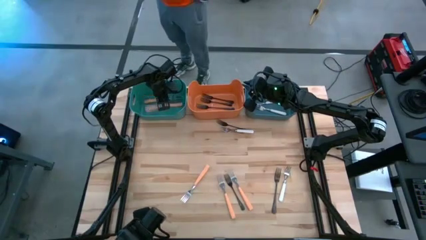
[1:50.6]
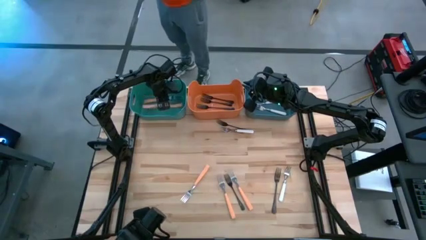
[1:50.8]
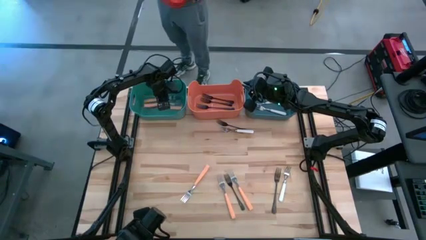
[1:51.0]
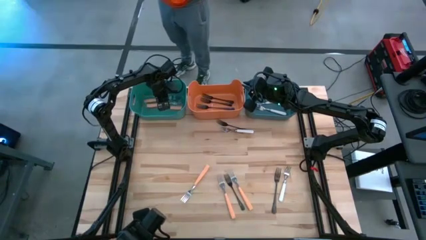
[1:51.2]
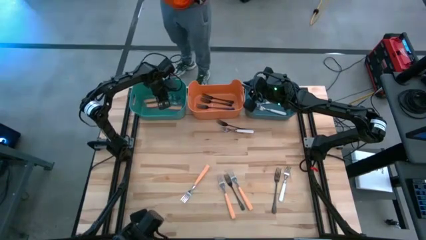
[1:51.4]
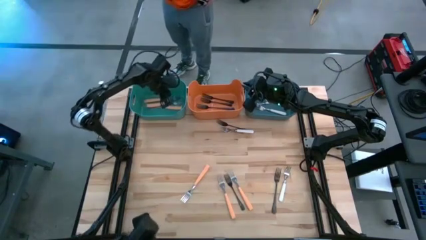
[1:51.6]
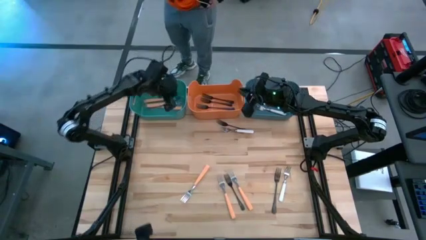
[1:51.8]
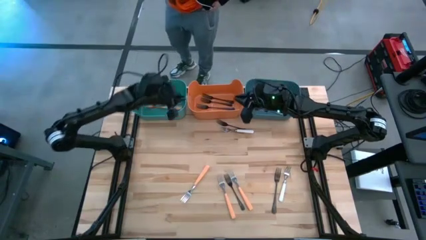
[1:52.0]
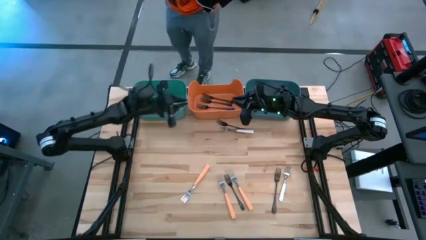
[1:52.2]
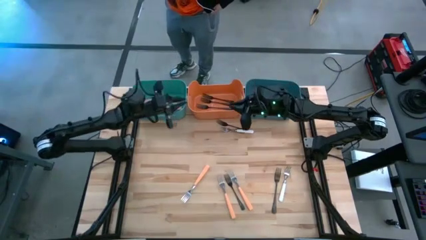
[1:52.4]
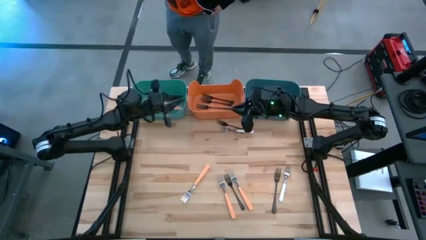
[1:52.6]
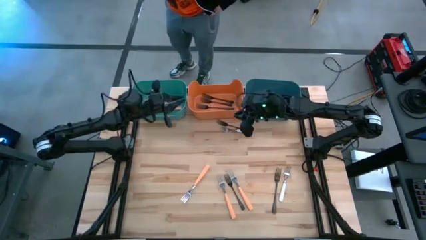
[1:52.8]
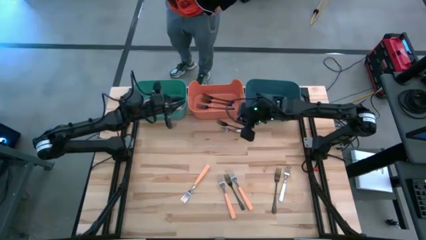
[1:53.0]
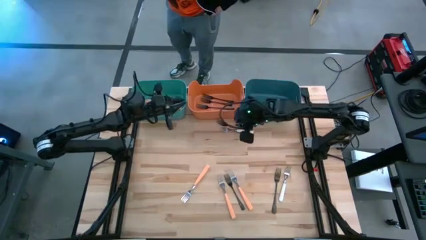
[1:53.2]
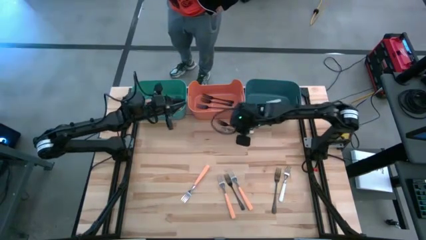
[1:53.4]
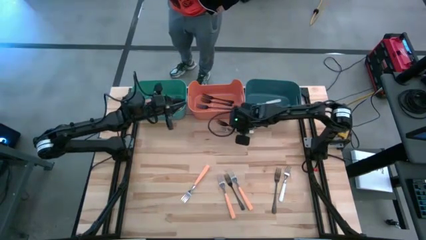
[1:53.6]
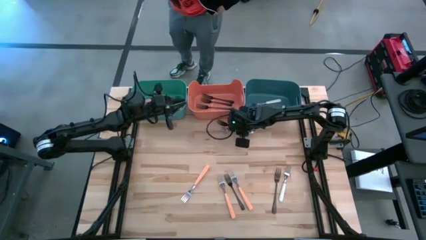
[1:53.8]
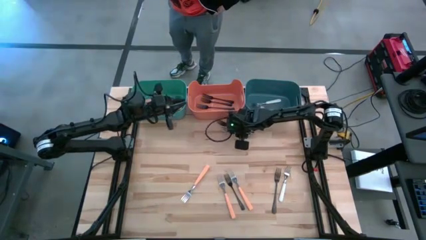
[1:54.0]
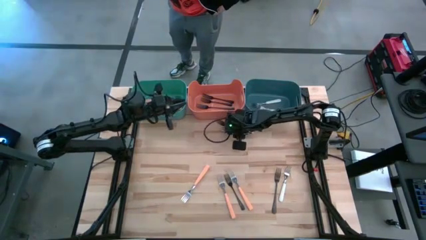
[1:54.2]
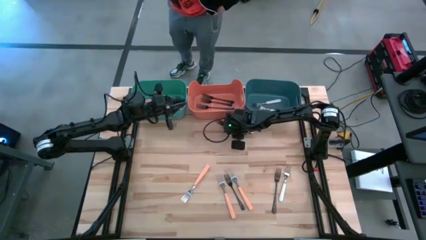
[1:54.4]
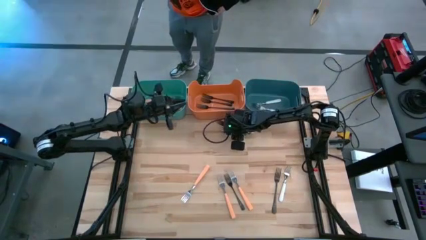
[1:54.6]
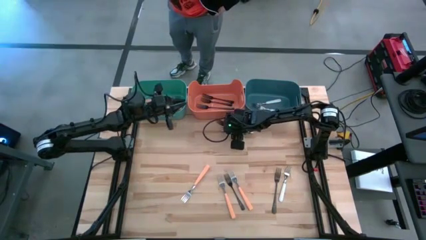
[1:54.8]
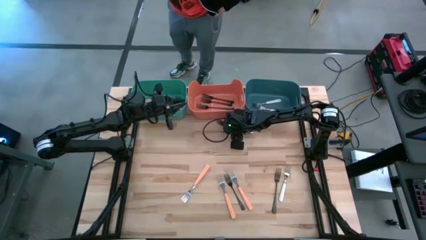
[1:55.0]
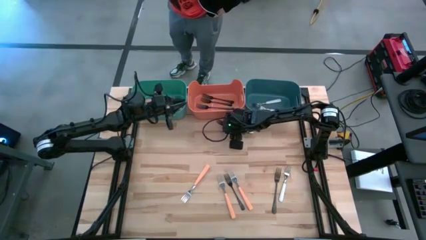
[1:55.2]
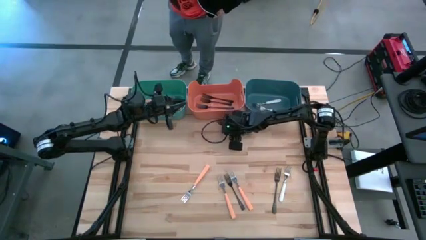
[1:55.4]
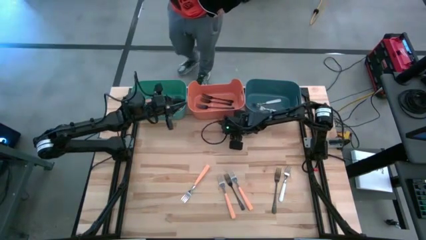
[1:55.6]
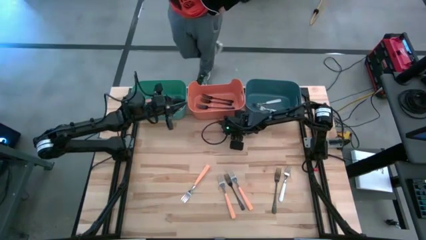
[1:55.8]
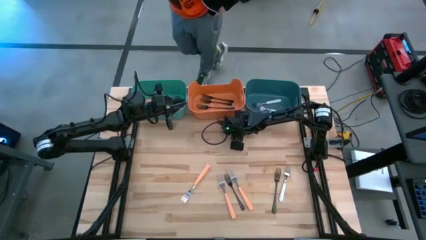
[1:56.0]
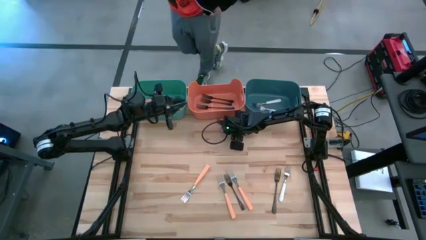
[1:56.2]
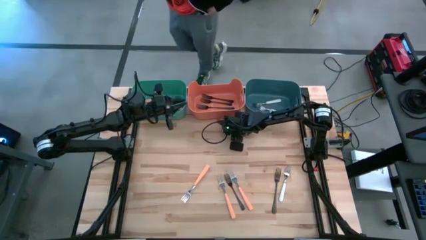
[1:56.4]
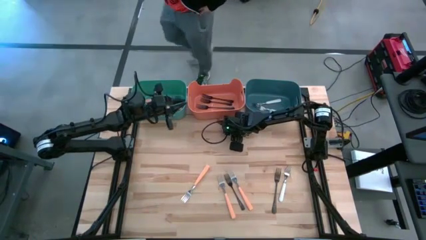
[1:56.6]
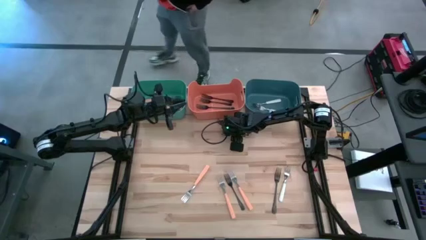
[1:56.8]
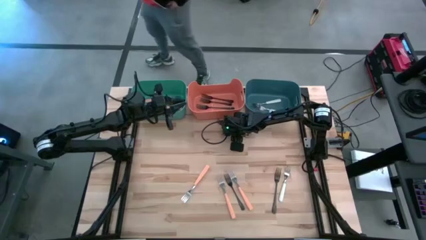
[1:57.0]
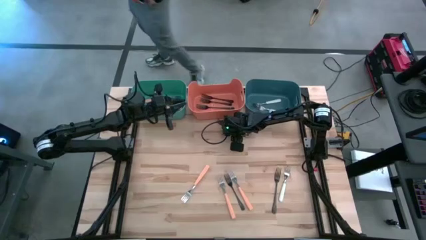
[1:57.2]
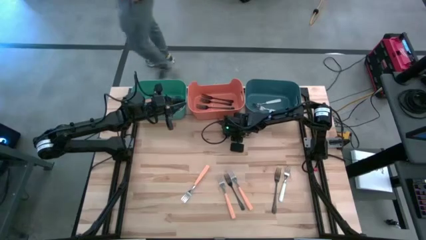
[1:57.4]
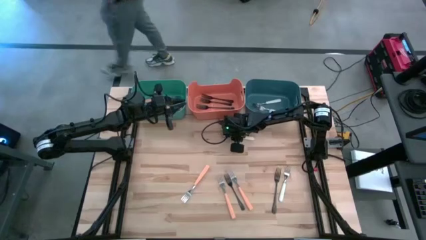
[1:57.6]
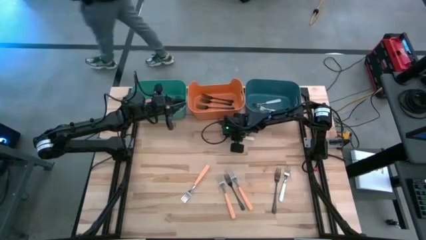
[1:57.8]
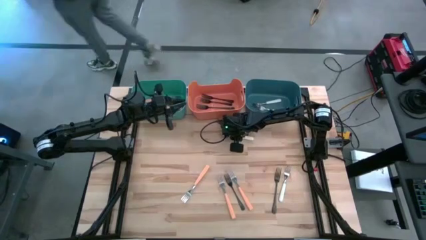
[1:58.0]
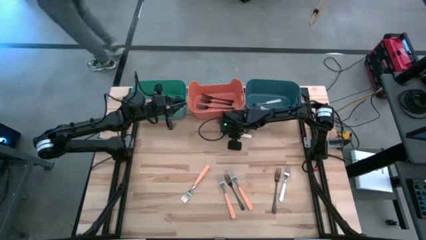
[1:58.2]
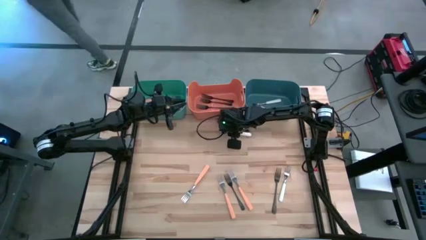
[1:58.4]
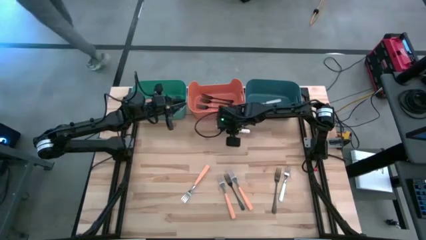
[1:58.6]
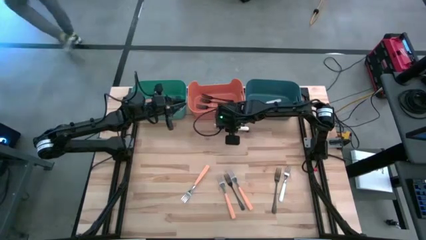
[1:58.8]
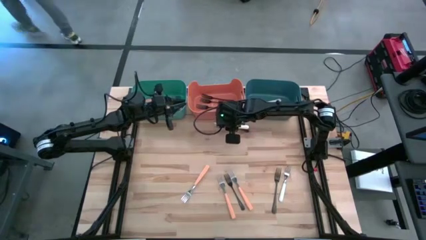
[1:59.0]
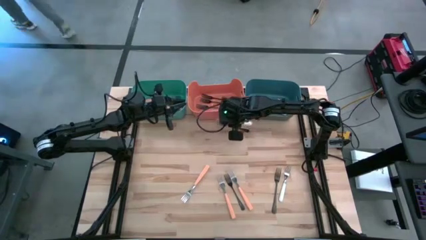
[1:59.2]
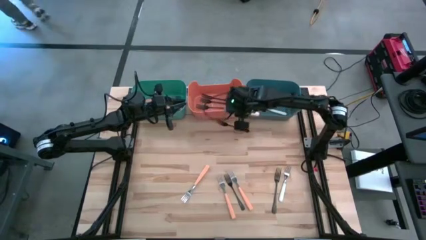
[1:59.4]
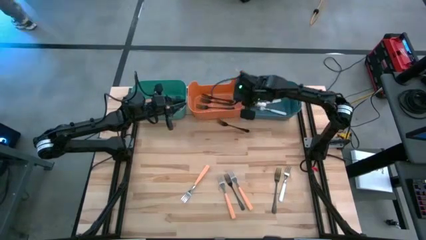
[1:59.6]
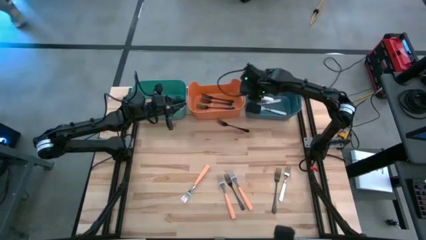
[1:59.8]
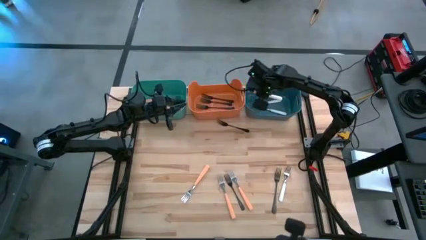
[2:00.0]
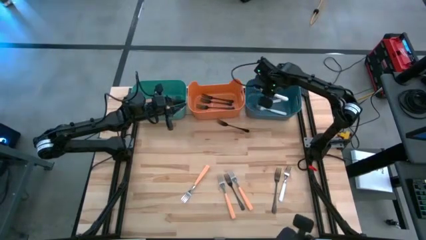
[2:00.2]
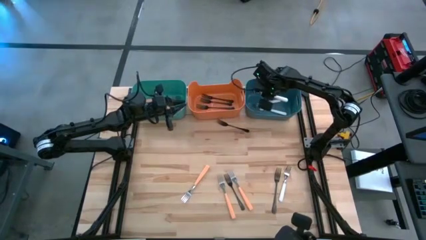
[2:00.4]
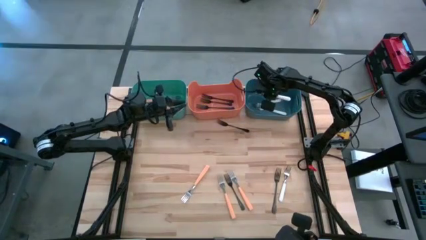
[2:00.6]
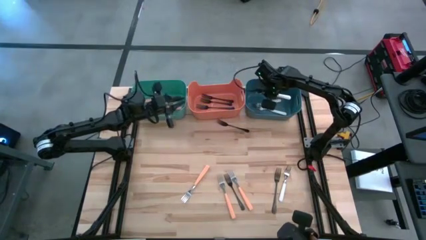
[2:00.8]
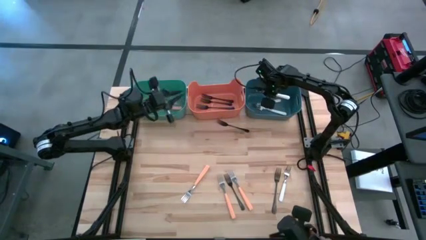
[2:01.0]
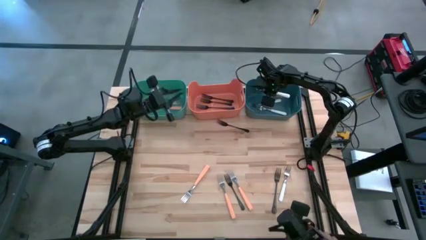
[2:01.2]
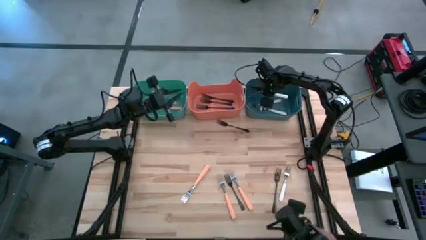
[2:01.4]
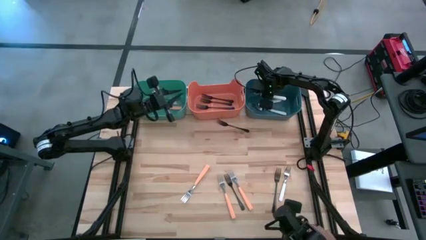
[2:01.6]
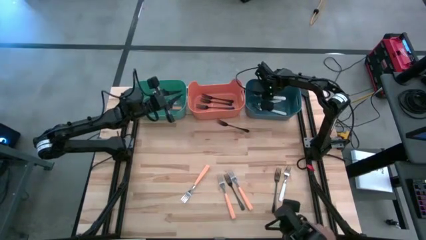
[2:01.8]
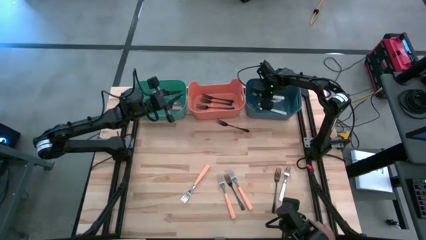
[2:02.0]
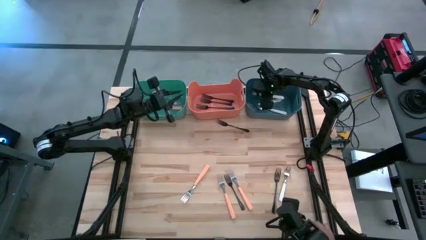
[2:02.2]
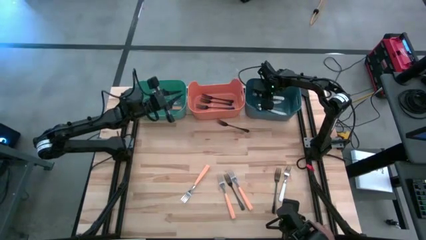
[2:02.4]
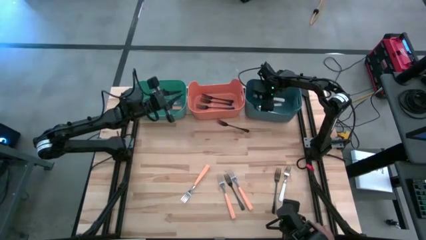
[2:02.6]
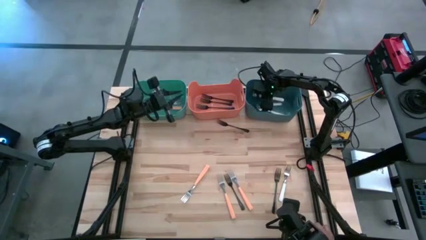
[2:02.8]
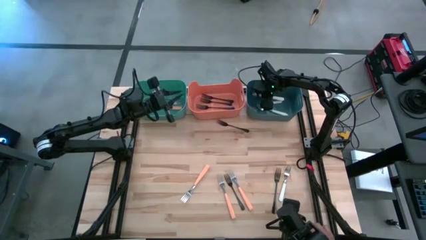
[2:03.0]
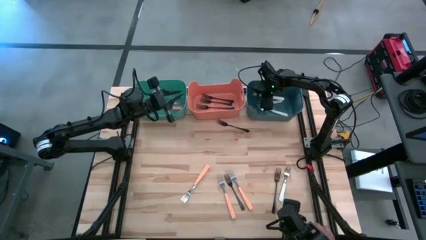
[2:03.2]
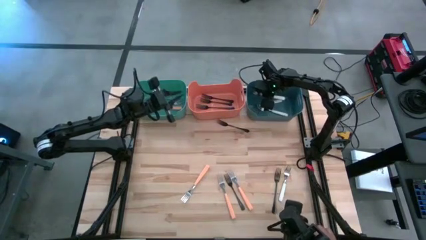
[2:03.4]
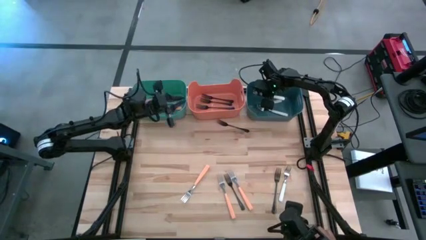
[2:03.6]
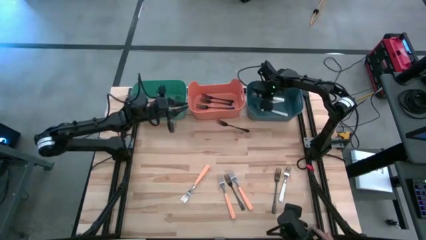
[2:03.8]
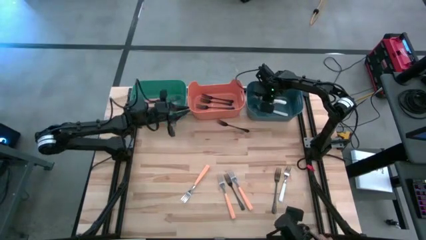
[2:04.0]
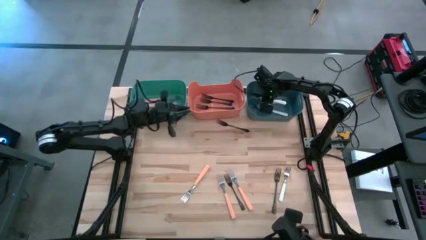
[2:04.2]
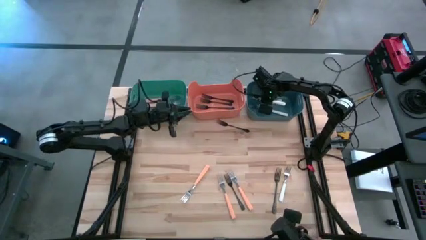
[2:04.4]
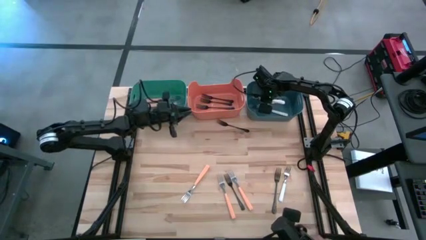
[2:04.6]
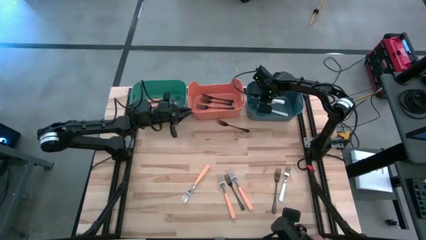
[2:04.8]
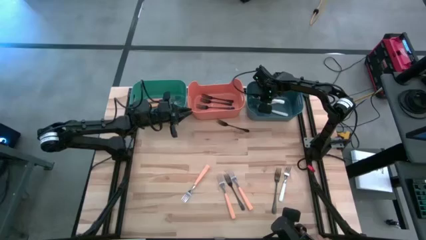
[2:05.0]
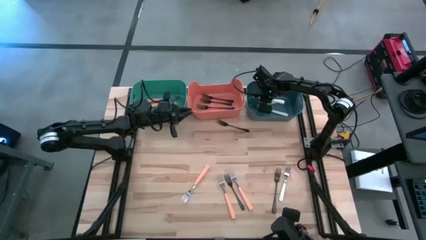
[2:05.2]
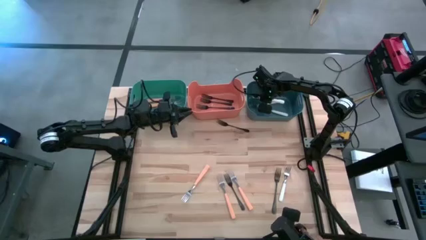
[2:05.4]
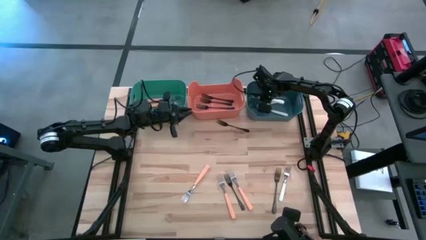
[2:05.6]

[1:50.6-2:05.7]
Task: Sort silverware by color (type)
Put the white fork into the blue bin

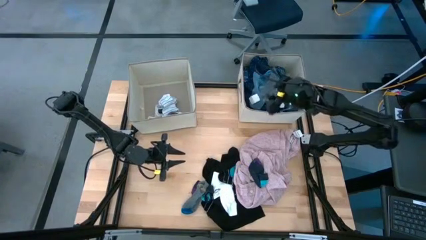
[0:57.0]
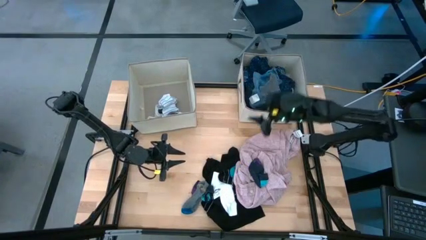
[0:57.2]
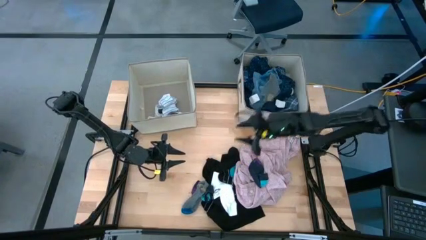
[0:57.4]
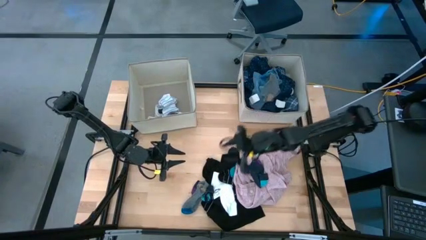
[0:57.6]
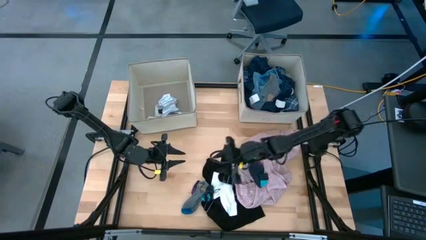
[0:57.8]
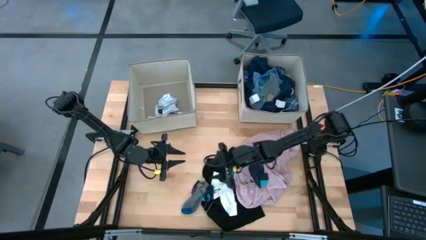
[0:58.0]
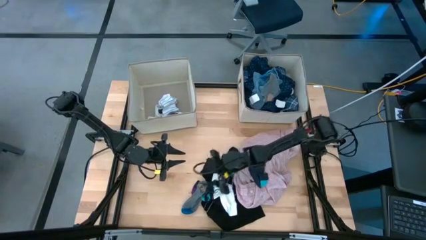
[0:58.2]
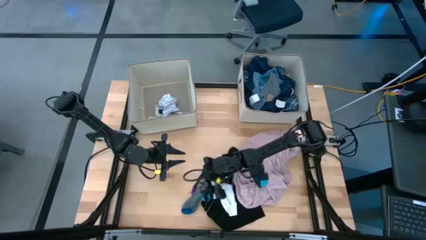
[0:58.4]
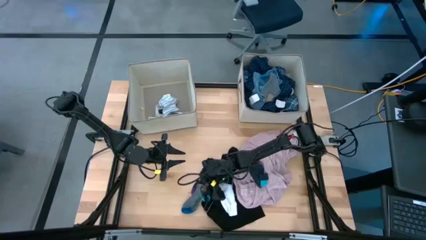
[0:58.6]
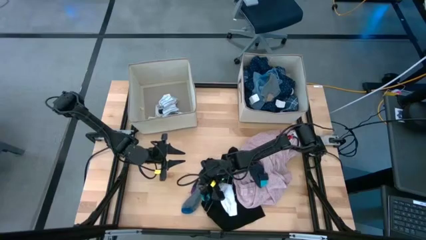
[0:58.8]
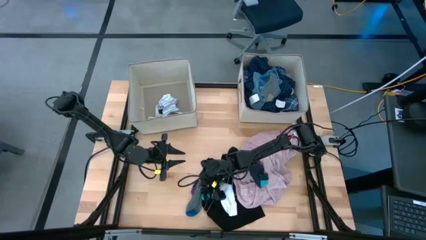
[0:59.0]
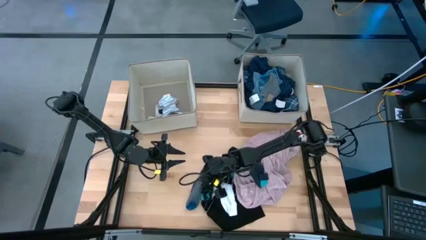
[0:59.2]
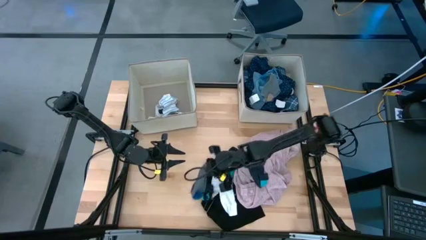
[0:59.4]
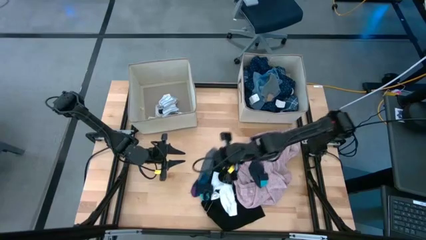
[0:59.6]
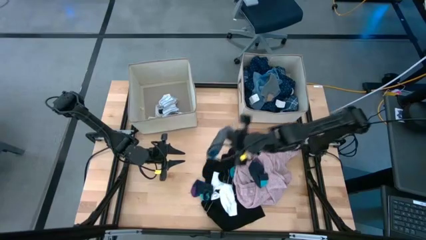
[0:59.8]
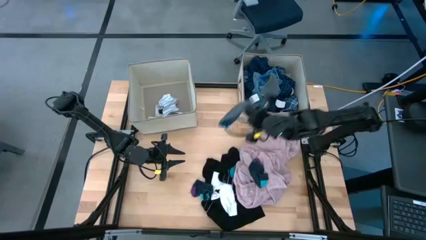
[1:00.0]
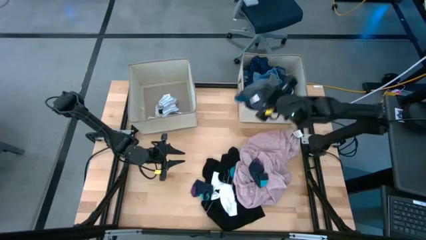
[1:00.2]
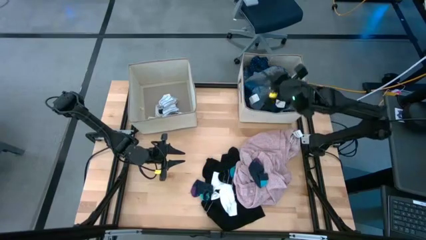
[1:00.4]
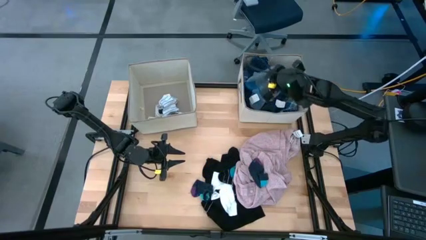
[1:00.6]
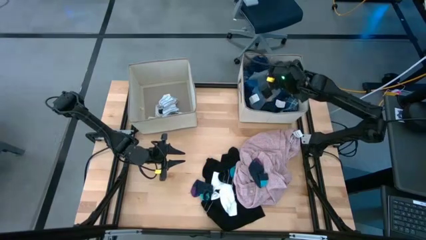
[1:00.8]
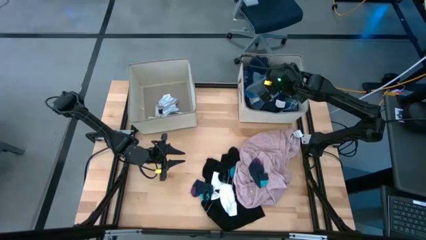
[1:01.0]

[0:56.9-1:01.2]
Task: Sort clothes
Put the gray sock into the right laundry bin
